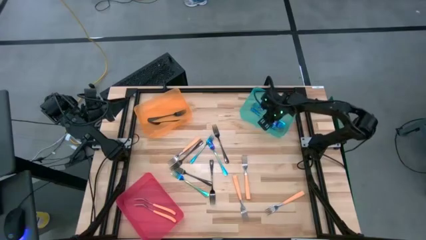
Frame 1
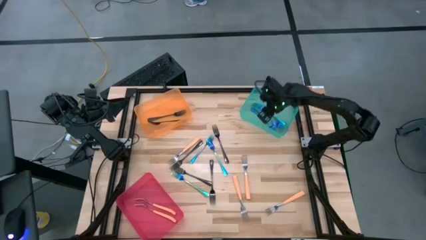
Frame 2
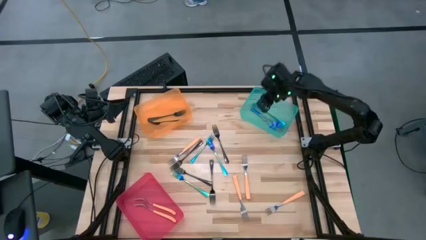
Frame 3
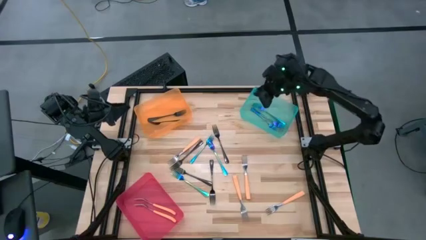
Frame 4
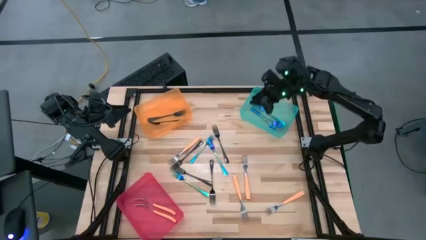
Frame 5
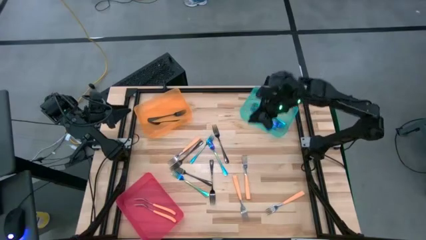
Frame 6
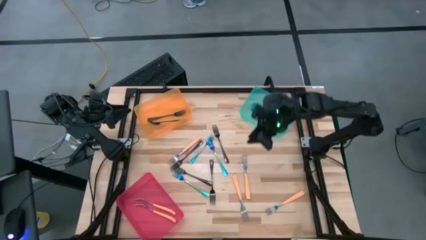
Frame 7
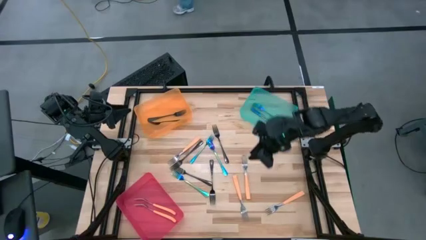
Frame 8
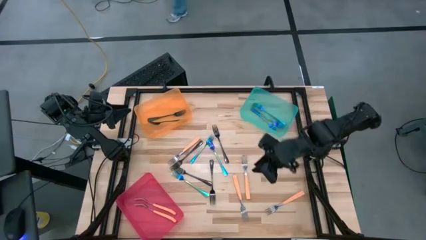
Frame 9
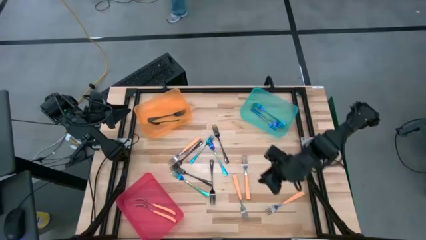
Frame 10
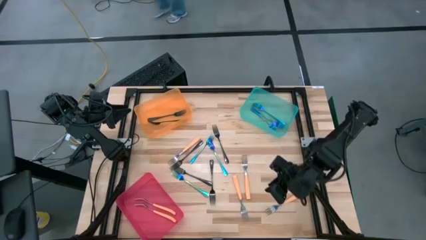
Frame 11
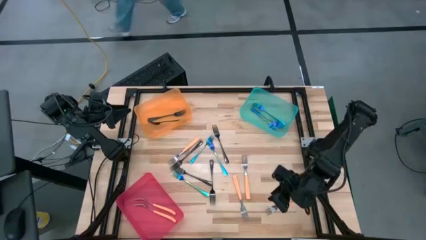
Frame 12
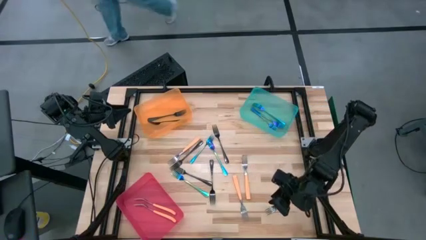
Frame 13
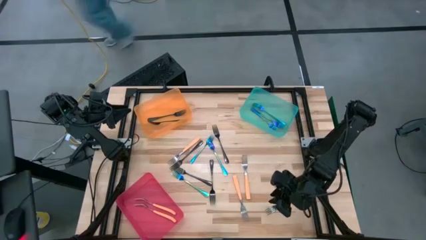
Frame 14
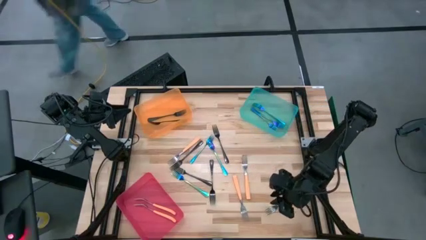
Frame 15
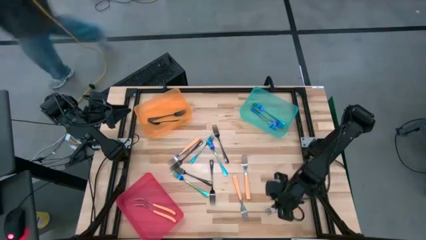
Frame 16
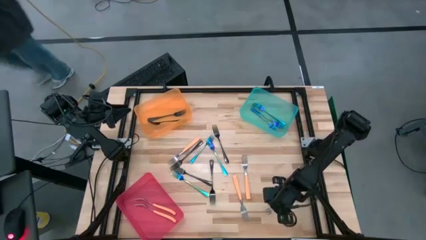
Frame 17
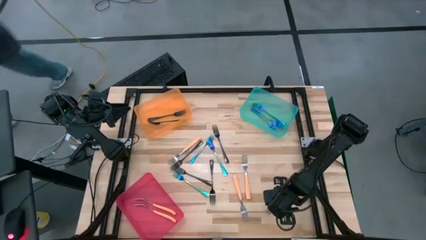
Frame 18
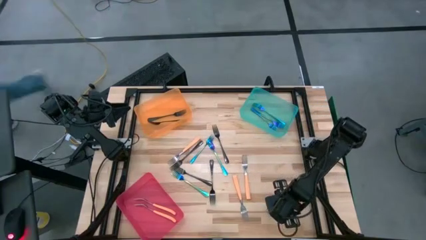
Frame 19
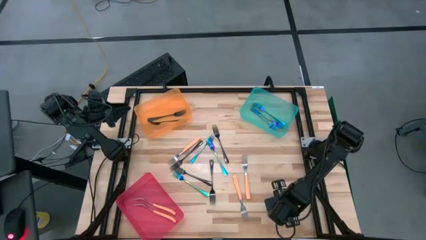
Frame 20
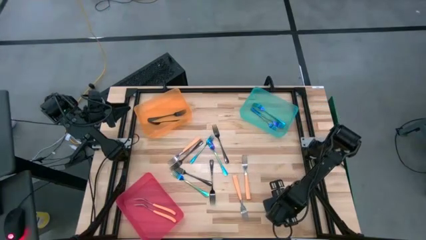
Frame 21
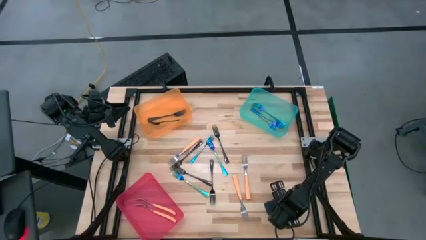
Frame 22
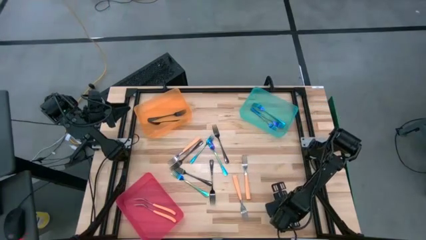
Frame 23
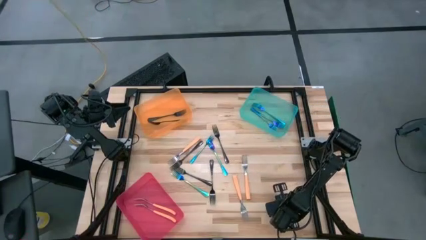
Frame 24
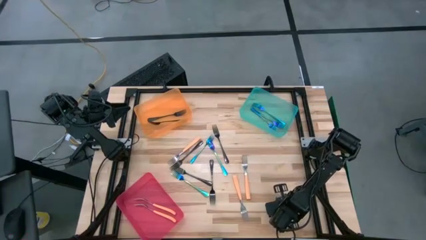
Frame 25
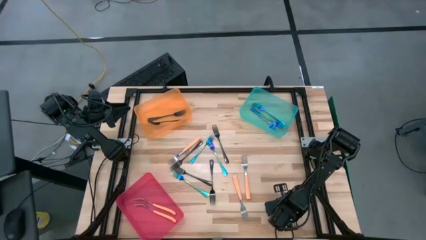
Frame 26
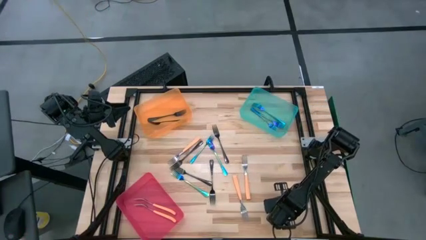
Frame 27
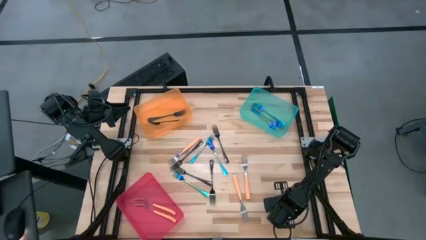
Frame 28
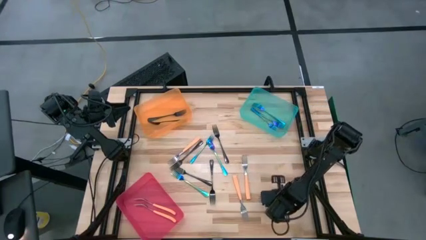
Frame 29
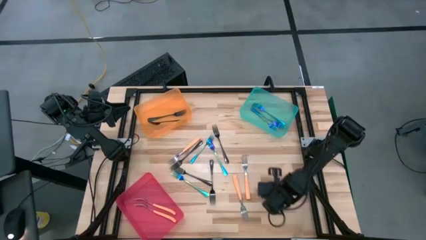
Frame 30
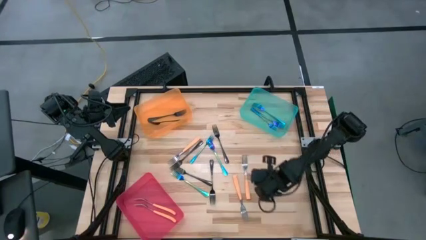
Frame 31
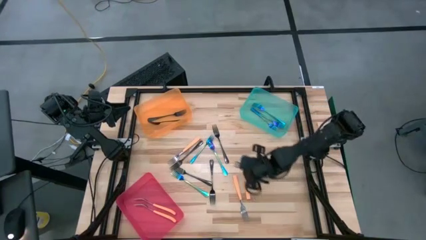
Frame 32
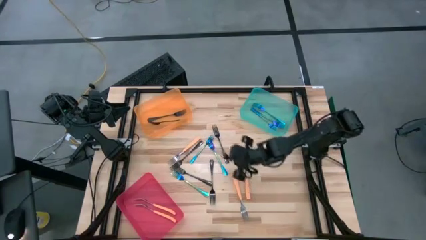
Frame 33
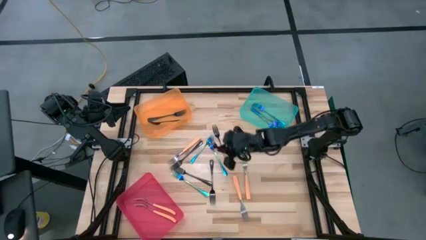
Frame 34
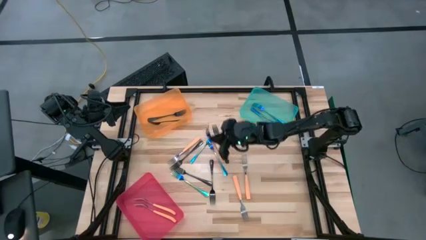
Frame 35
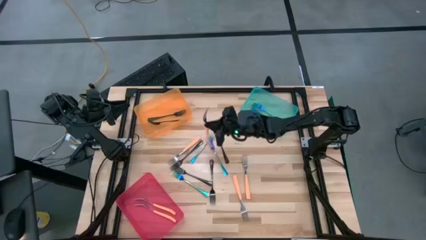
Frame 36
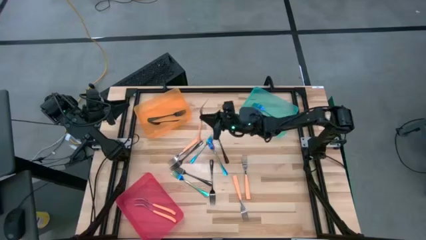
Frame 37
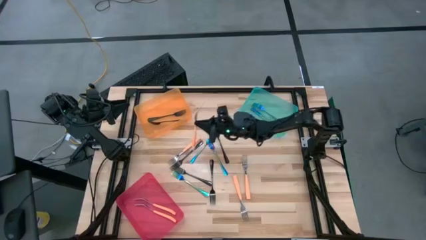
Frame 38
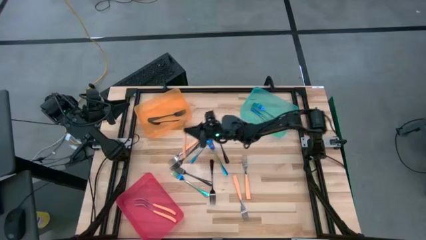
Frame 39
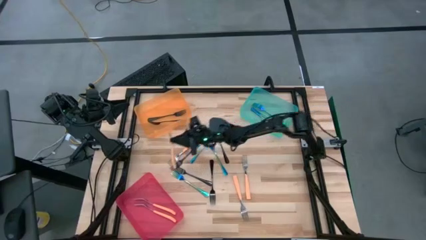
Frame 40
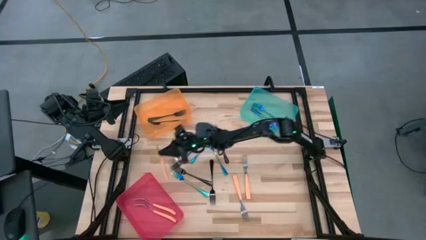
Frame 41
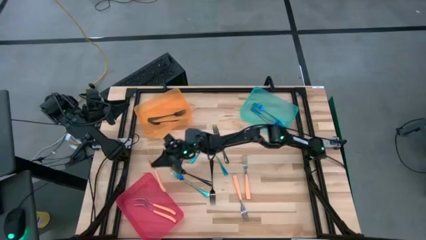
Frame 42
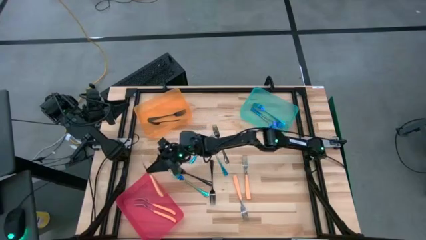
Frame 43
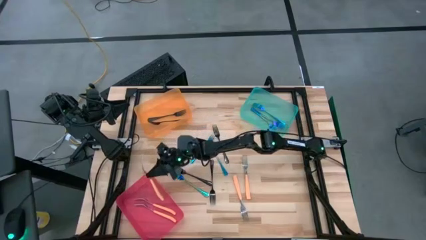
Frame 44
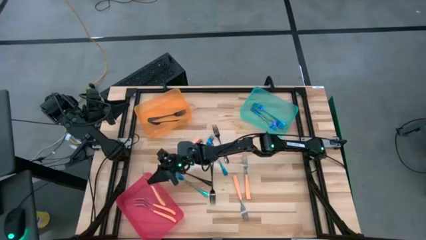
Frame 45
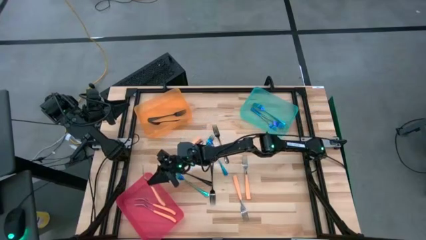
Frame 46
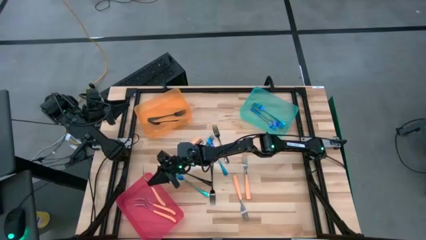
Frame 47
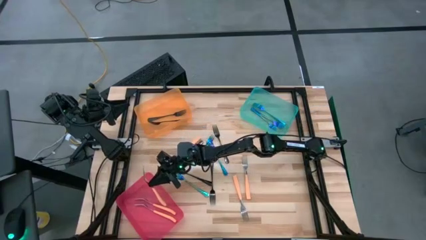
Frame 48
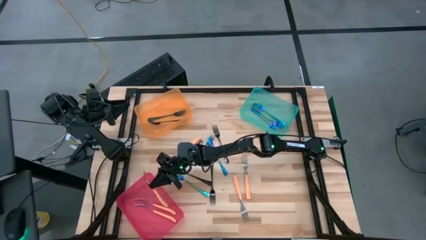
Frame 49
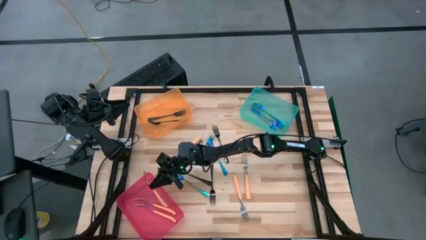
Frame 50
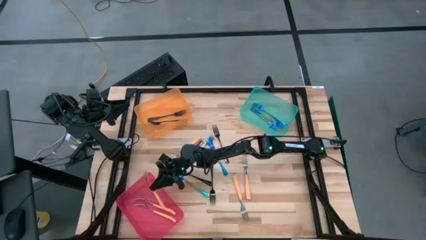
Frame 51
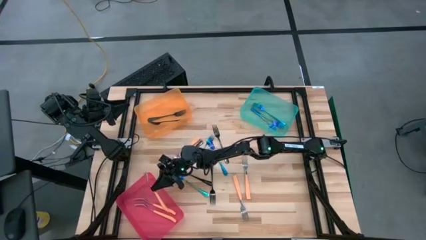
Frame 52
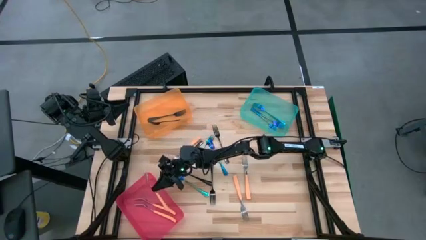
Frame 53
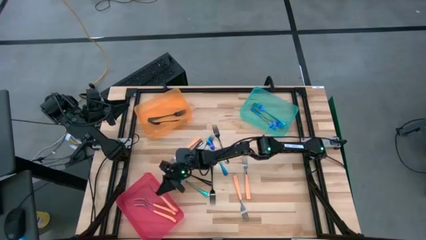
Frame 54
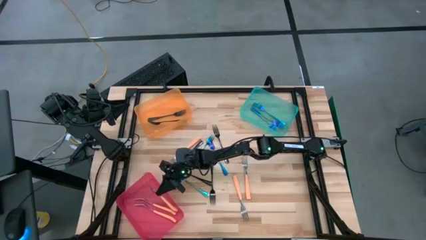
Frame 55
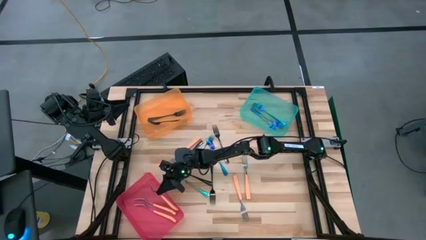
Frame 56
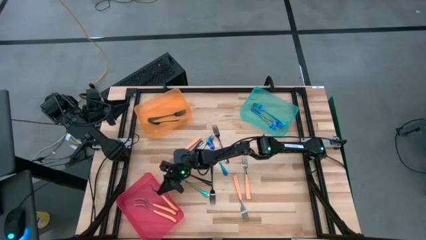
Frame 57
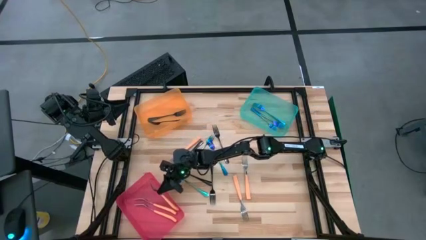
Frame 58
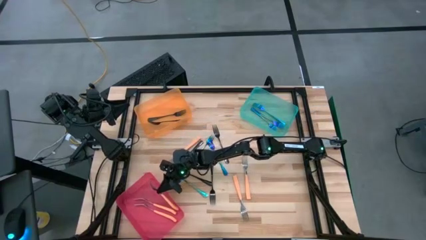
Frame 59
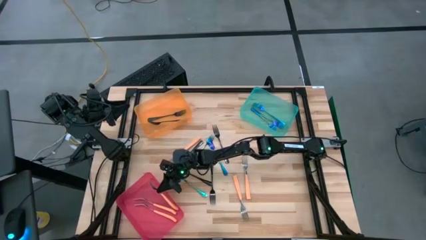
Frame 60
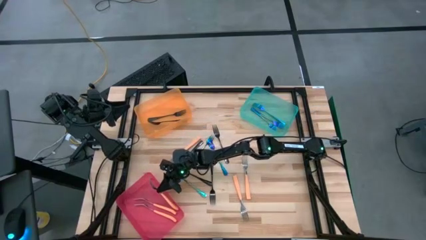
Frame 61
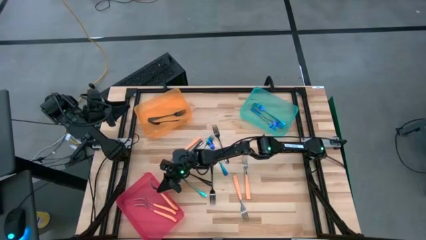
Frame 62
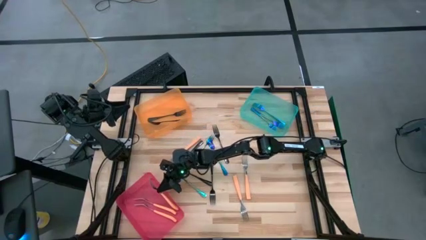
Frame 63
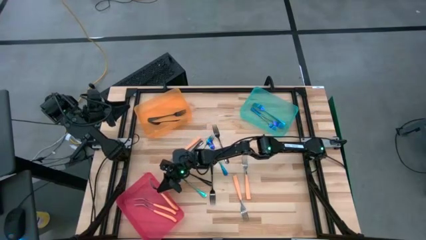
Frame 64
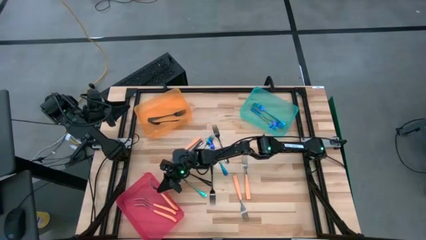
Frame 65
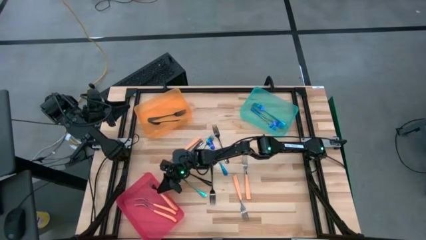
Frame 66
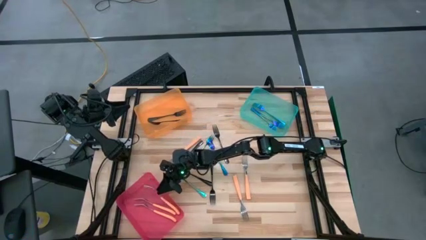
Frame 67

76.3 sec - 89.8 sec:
Task: Sort silverware by color (type)
Put the orange fork into the pink bin

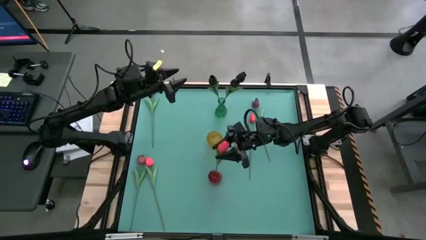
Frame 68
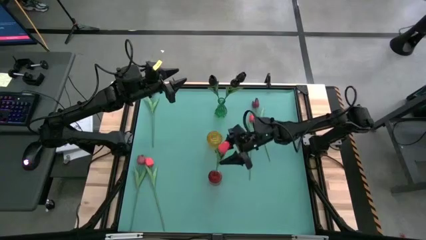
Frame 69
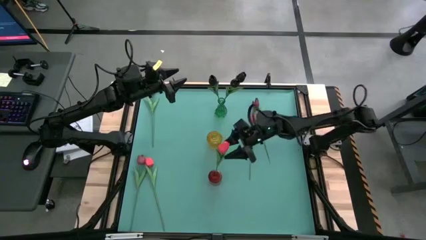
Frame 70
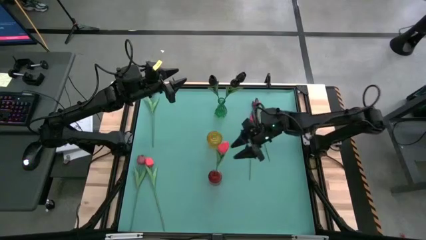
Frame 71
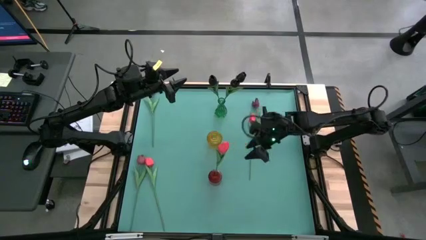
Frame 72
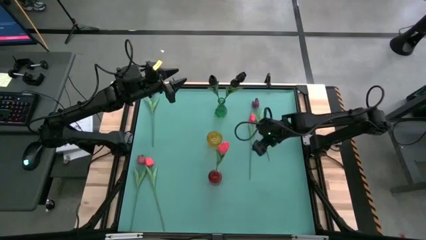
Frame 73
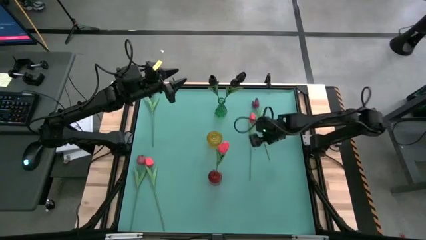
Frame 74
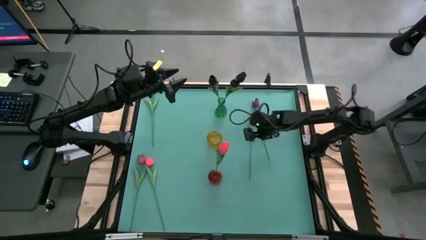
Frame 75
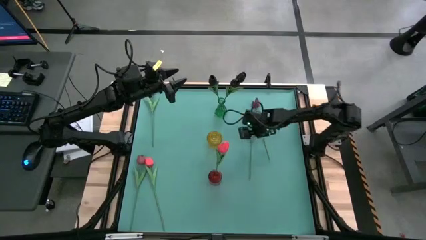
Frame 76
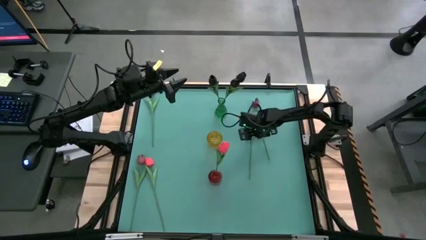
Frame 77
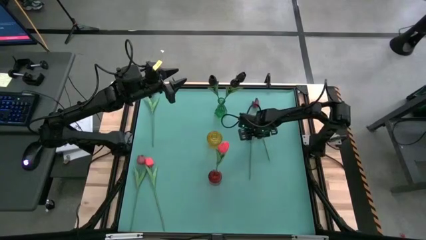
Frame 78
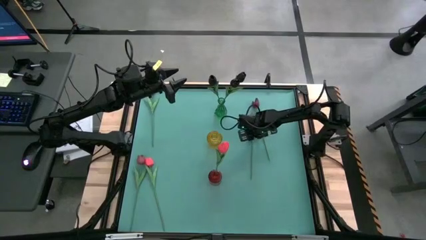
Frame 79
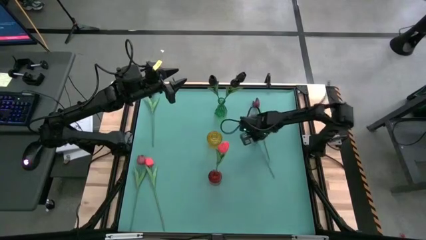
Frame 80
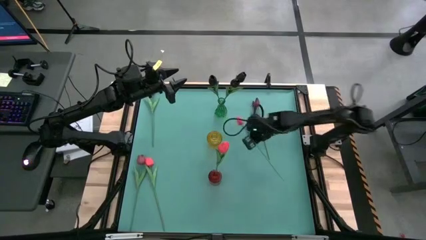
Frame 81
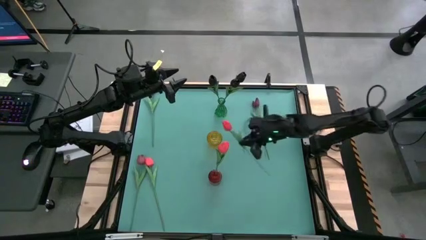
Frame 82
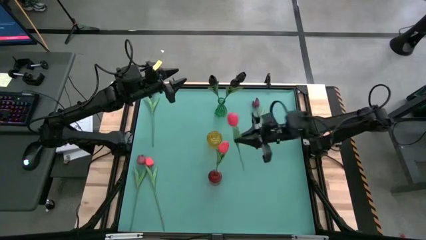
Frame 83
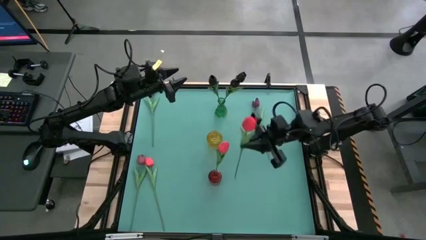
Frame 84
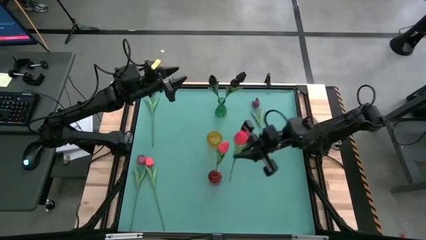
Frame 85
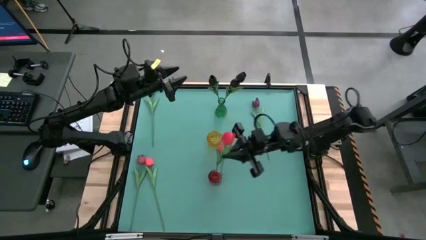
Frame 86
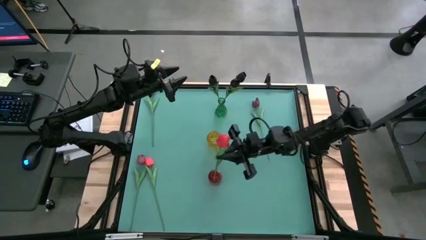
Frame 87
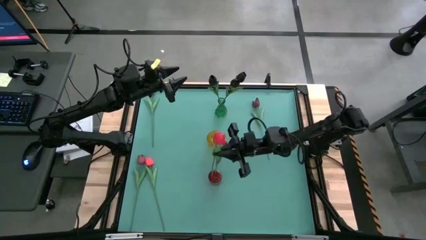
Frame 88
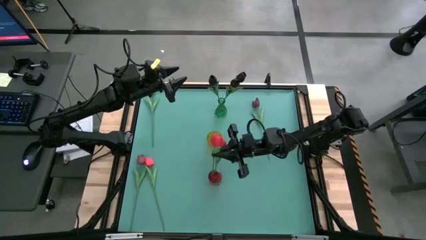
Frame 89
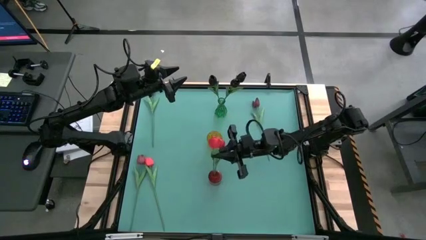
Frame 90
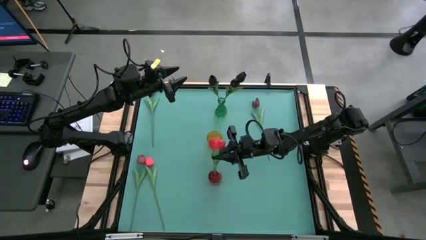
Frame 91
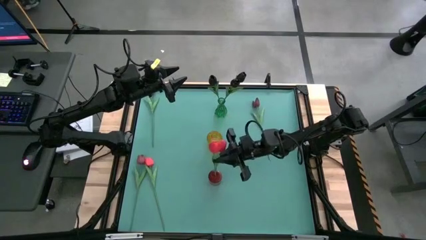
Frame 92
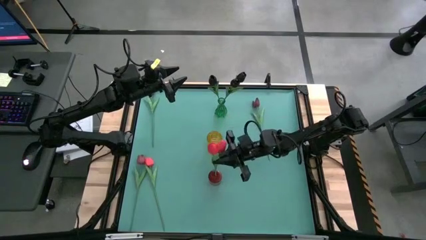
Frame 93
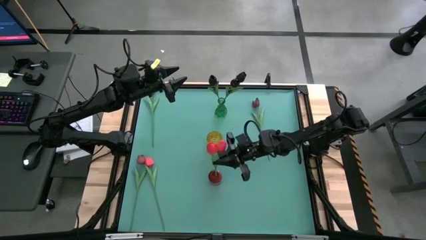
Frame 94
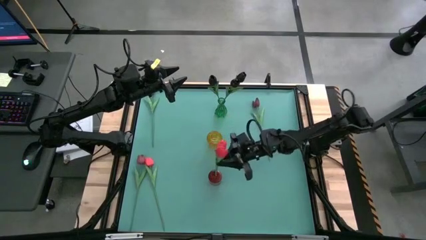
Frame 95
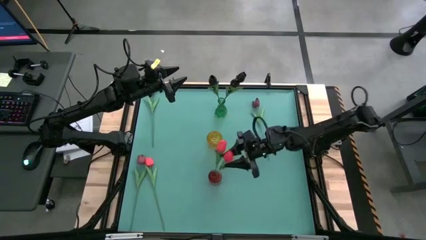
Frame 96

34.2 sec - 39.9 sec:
Task: Sort flowers into vase by color
Put the top pink tulip into the red vase
